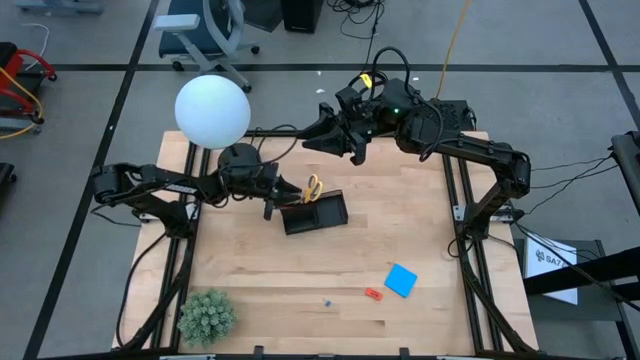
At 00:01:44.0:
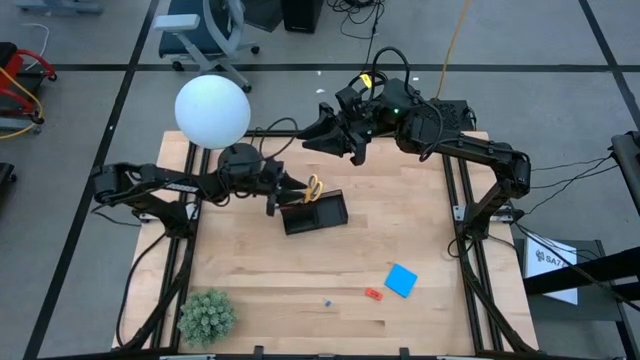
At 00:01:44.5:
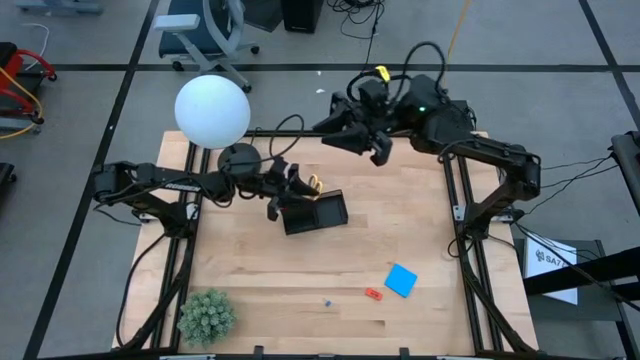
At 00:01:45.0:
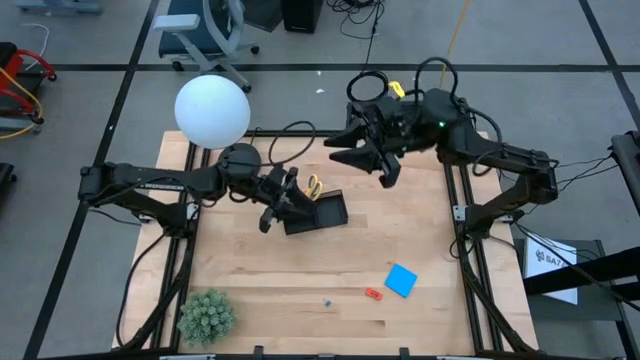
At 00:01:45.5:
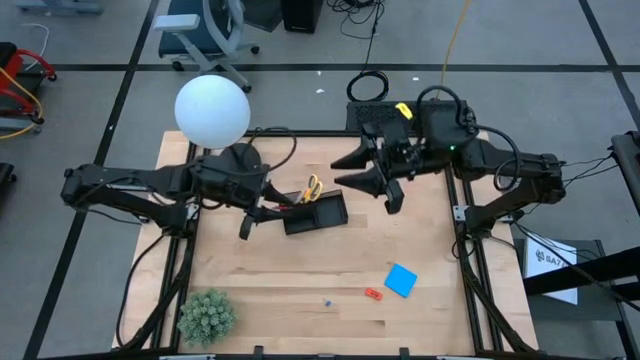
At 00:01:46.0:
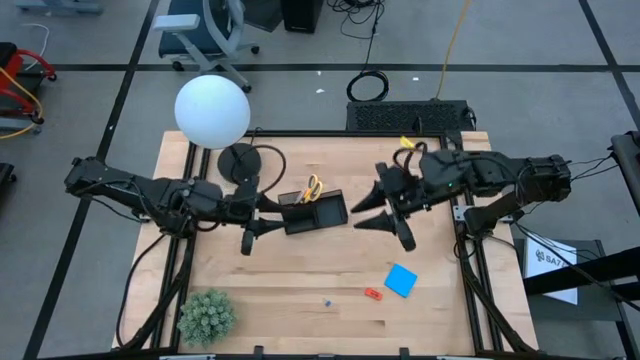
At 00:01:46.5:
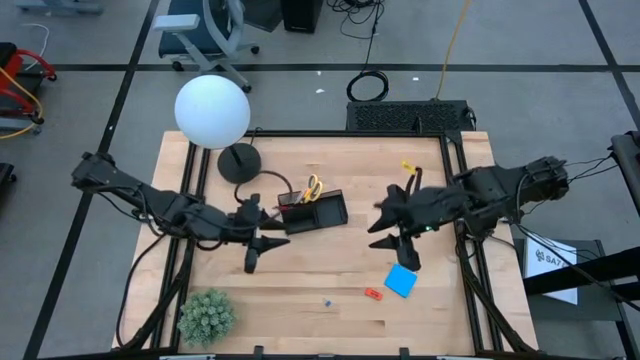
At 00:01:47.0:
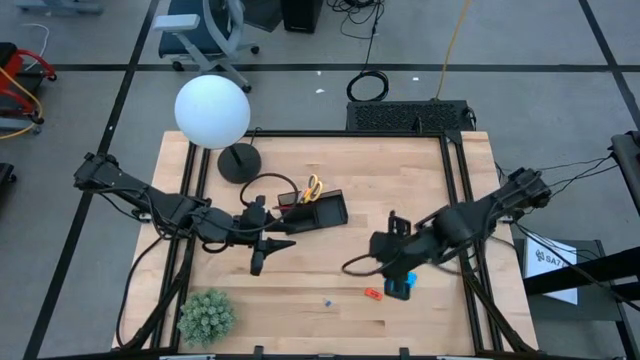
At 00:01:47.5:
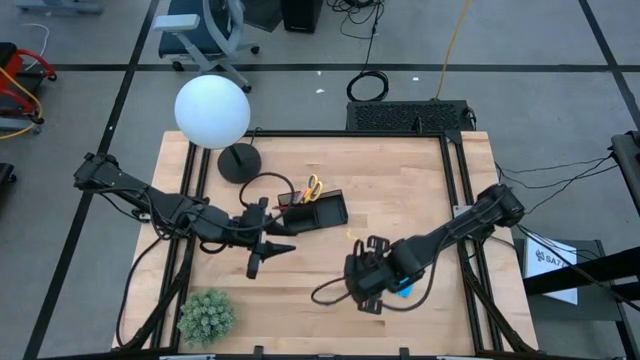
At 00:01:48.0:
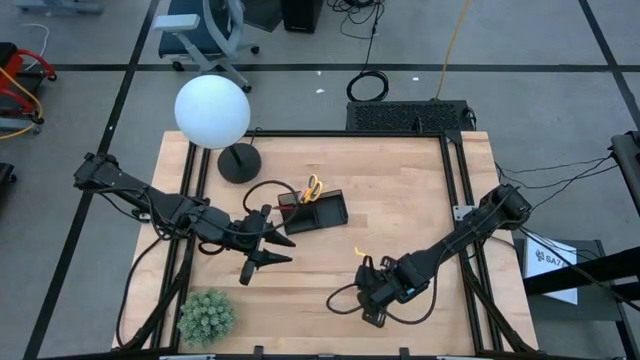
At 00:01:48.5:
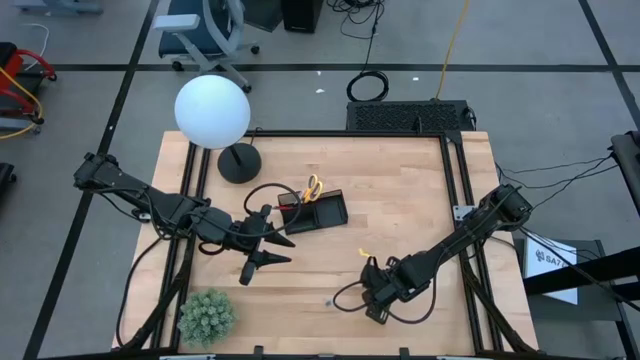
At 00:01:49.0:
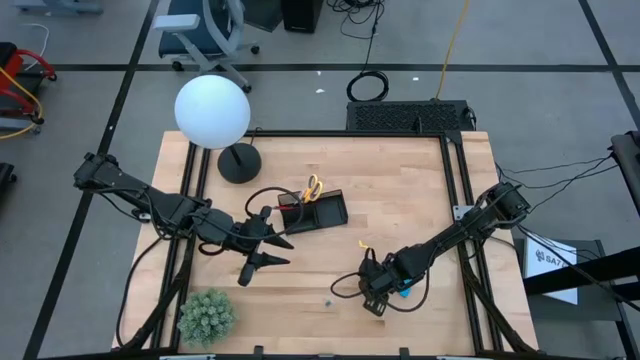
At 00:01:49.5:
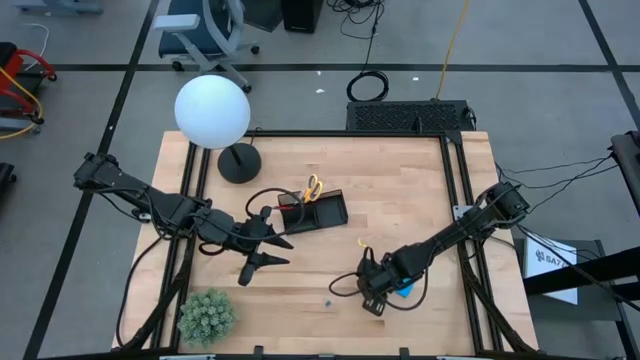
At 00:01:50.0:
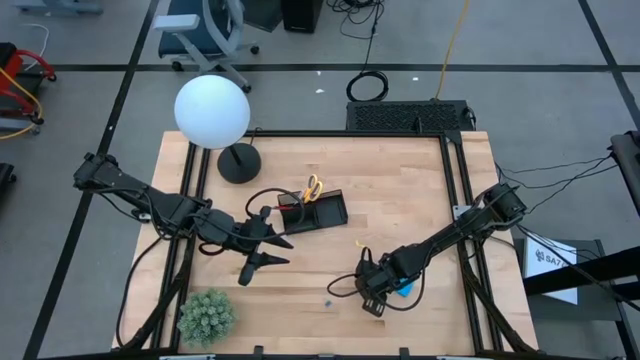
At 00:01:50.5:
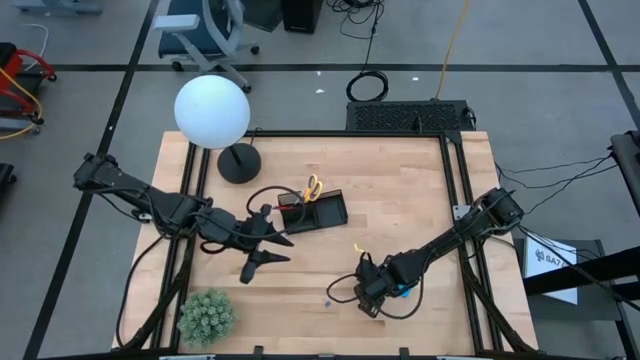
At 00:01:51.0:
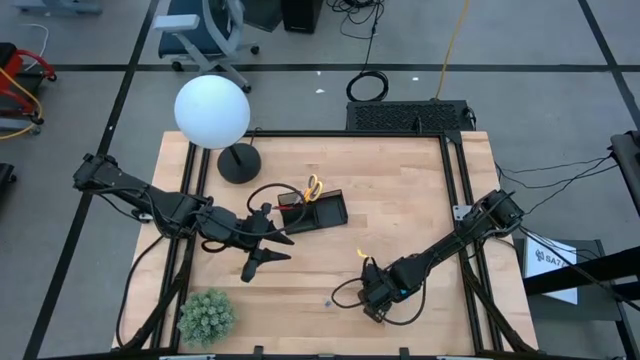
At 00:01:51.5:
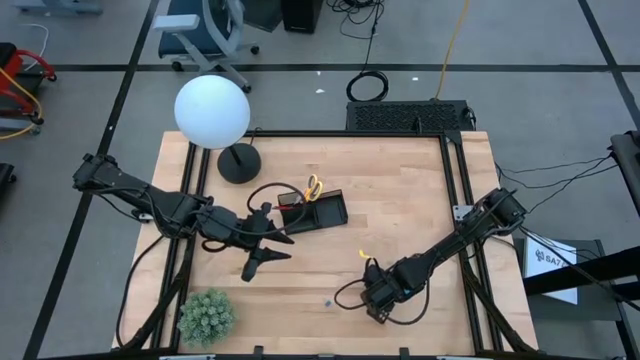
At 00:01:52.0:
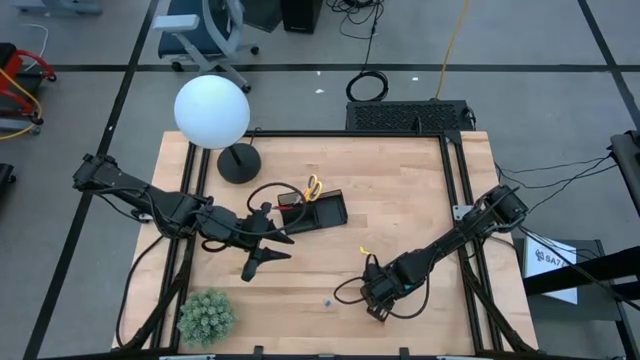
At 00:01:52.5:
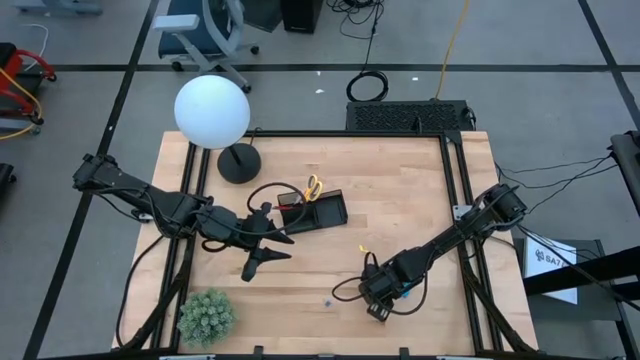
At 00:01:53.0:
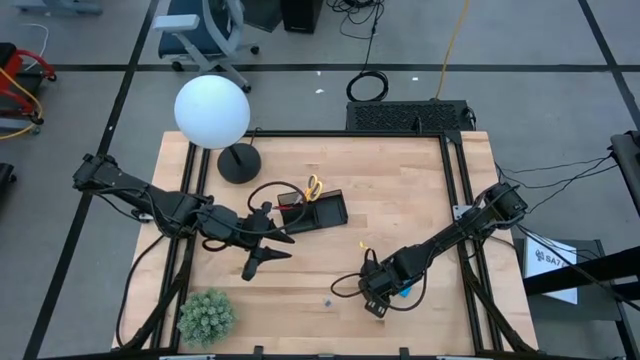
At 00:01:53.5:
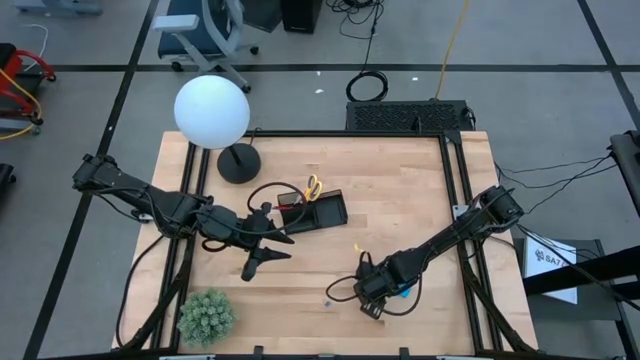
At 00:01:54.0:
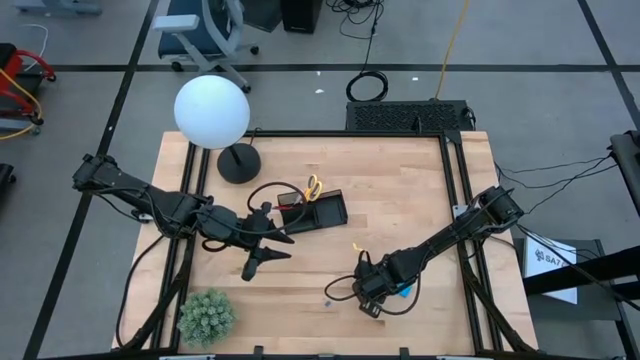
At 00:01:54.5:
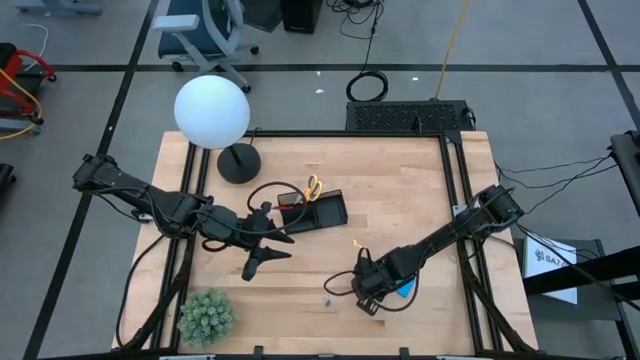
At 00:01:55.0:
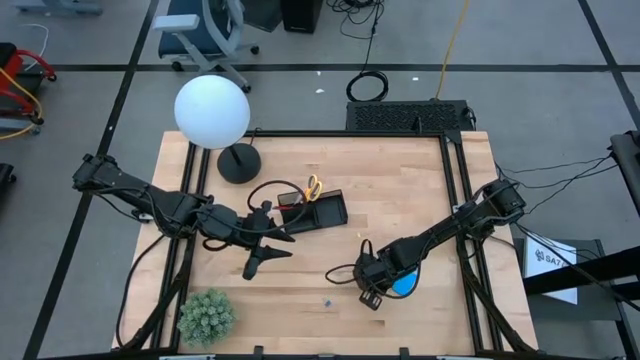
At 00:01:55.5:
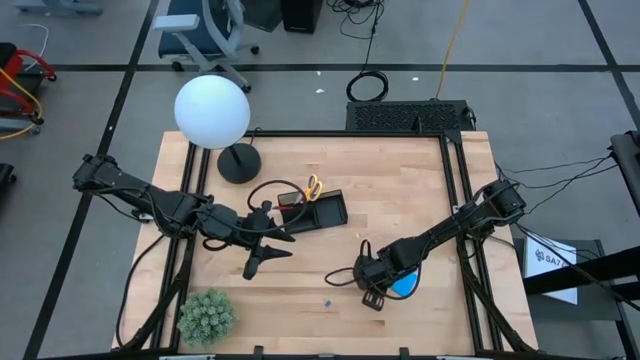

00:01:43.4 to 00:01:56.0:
Task: Pick and place office supplies into organizer
Put the orange eraser into the black organizer

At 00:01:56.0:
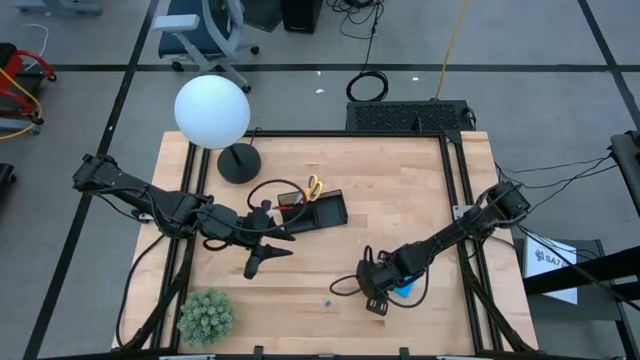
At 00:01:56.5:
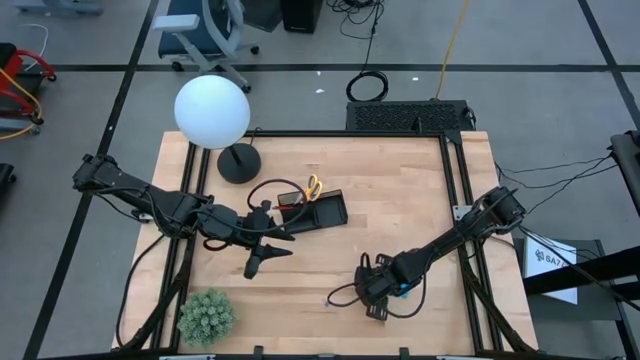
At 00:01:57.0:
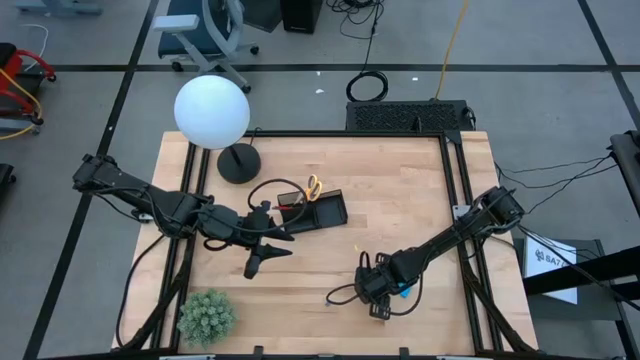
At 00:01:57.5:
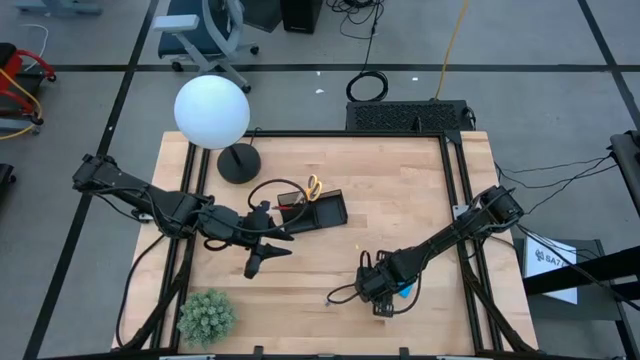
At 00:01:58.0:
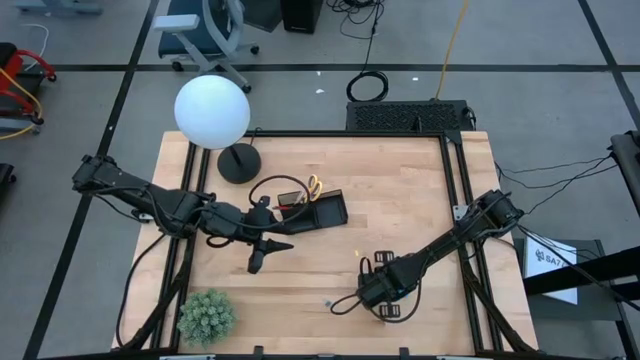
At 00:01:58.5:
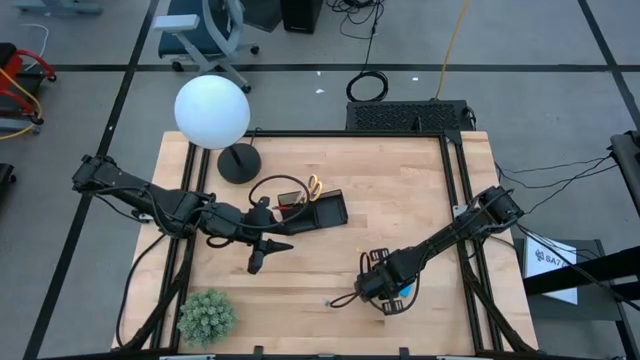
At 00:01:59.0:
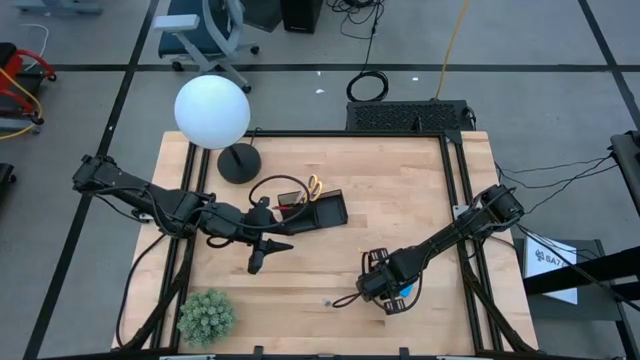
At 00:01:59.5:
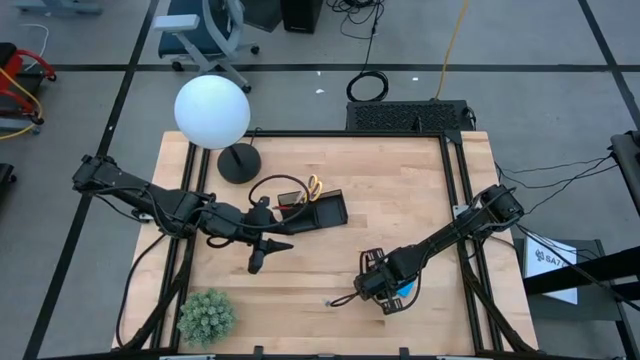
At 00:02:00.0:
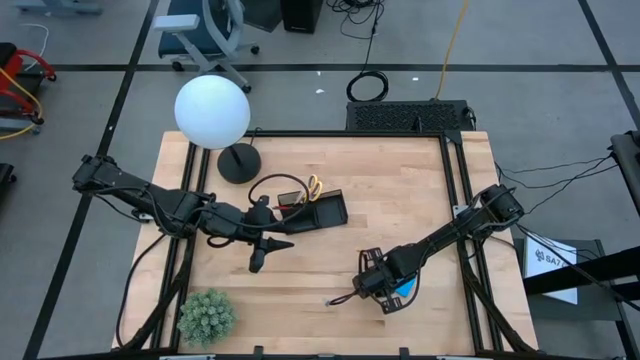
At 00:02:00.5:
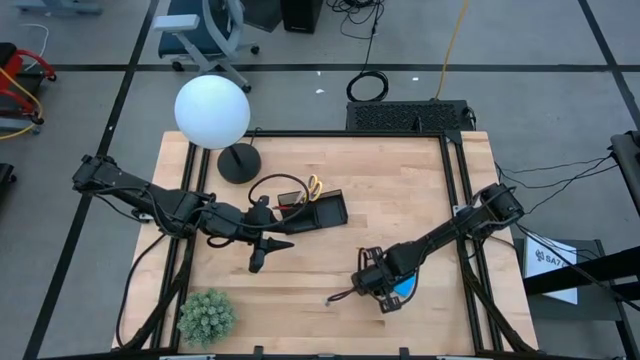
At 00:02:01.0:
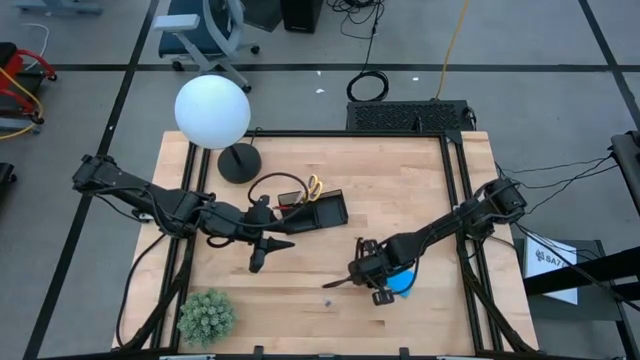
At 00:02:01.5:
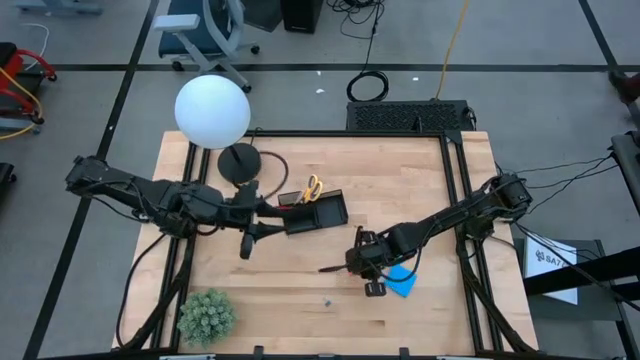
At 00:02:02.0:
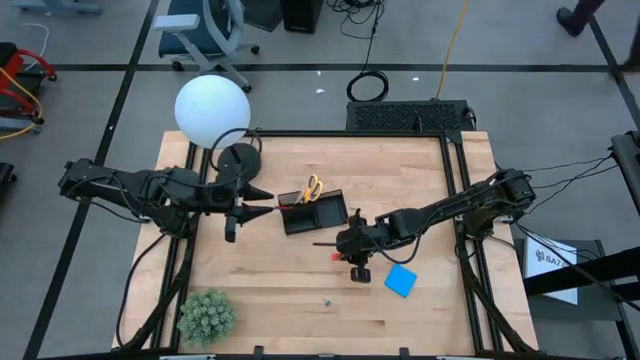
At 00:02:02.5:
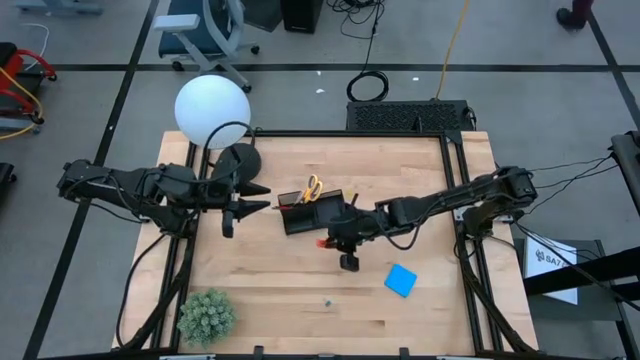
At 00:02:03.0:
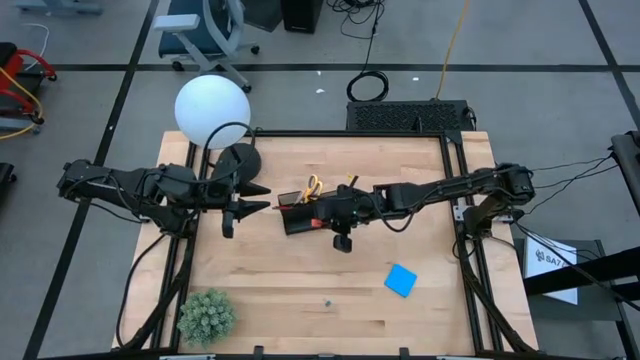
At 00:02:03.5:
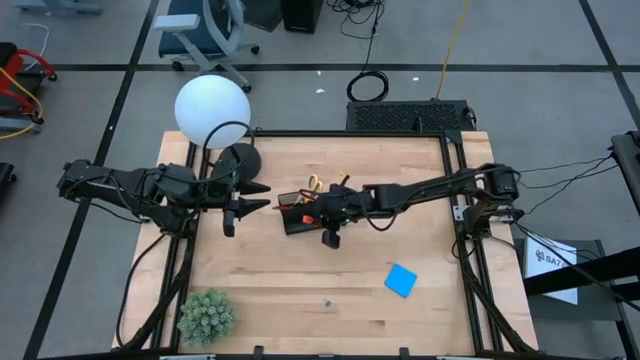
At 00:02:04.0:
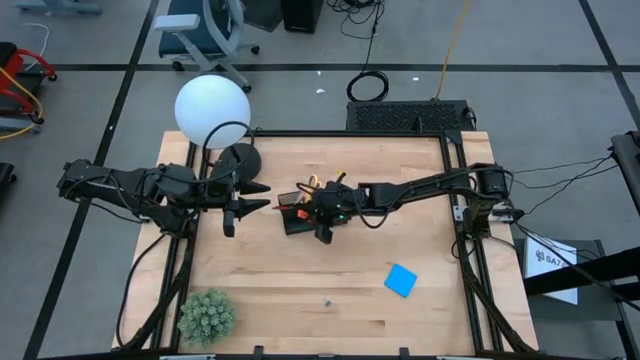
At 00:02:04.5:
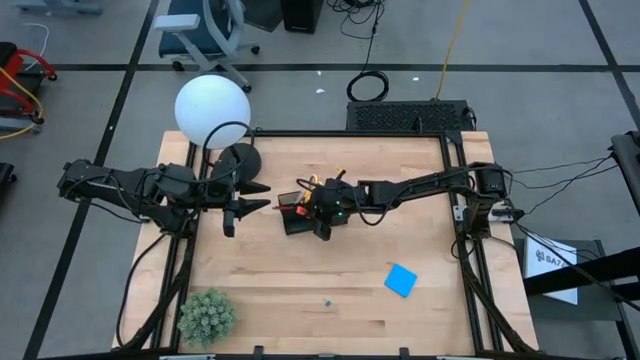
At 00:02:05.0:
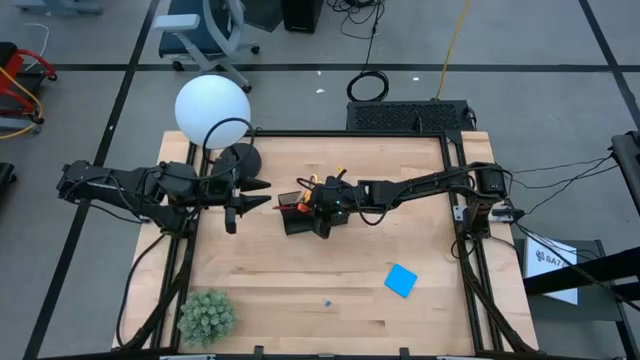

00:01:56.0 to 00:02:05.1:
Put the orange eraser into the black organizer
